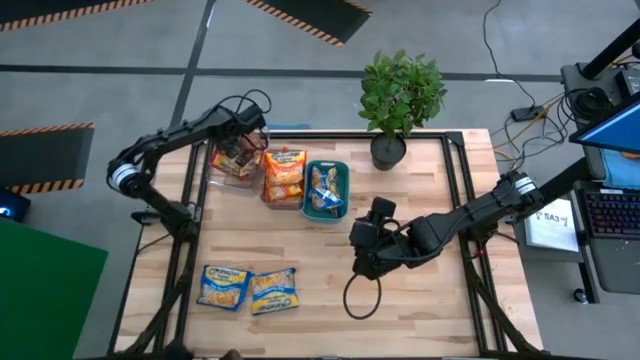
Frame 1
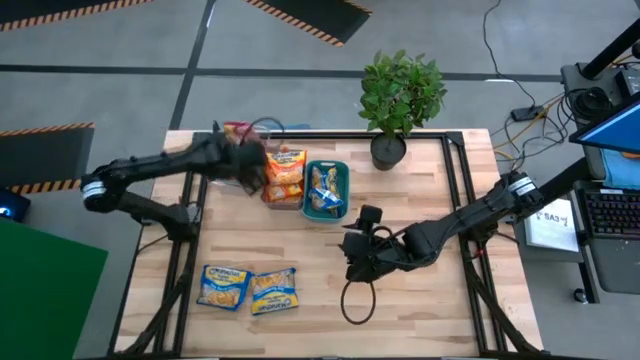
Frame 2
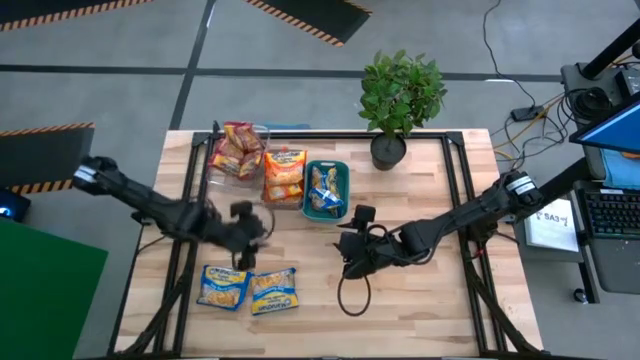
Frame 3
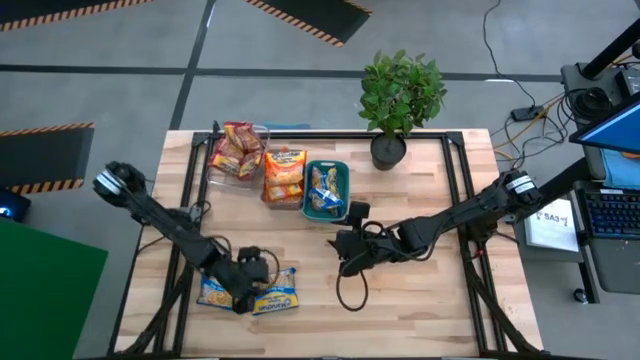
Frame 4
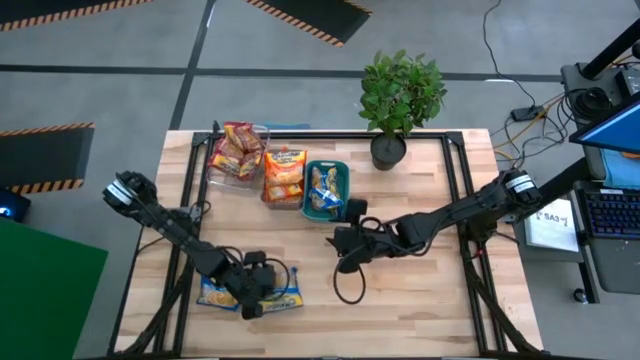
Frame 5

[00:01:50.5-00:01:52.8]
Task: Sort Maruchan noodles
Put the blue noodle pack into the green bin

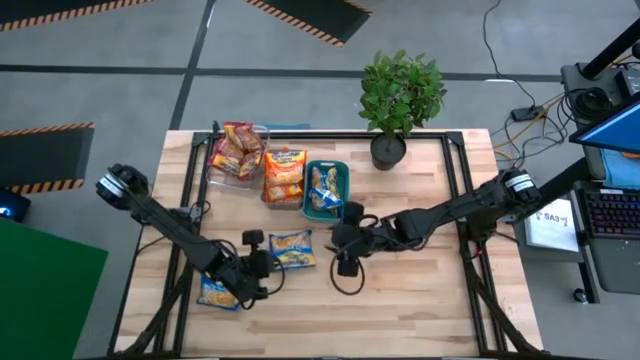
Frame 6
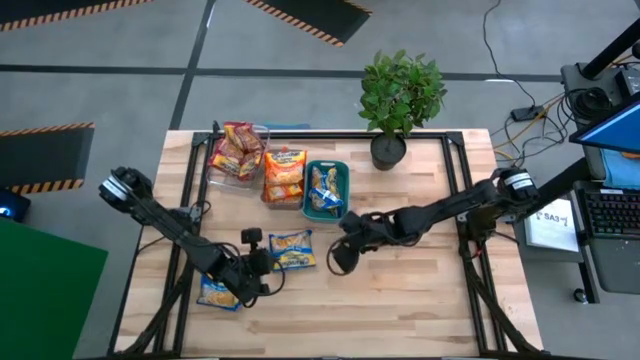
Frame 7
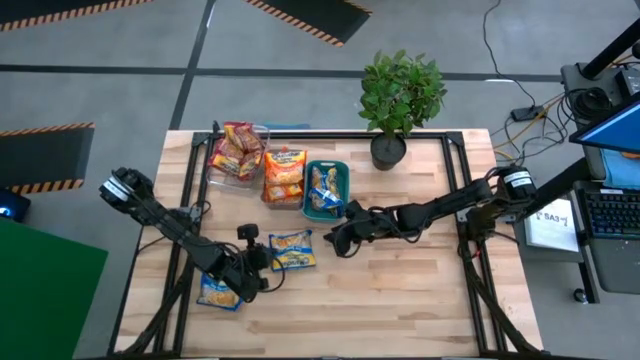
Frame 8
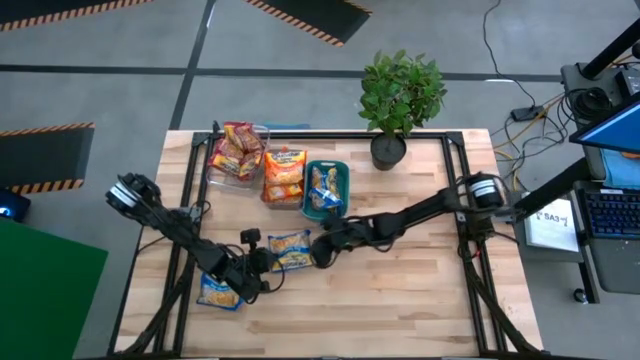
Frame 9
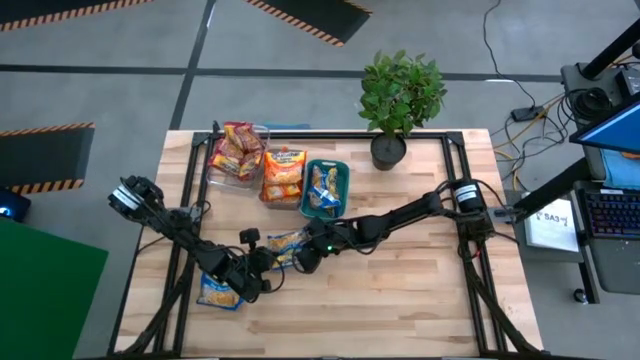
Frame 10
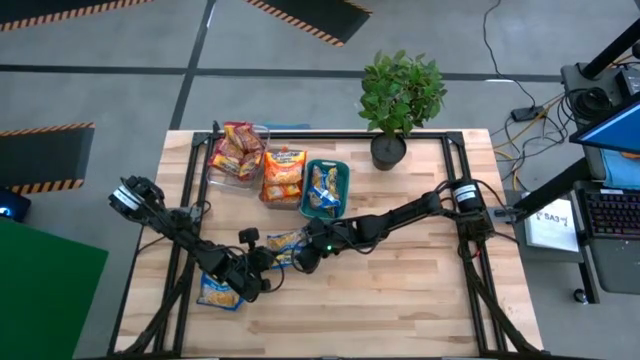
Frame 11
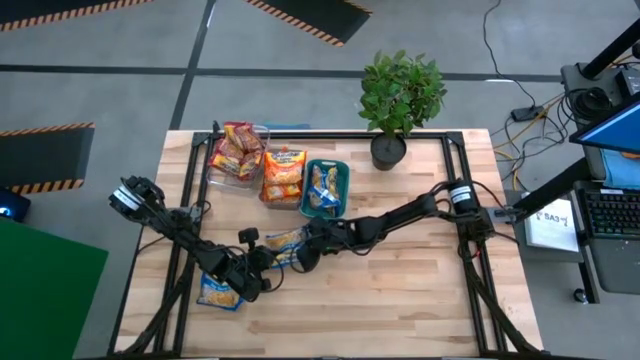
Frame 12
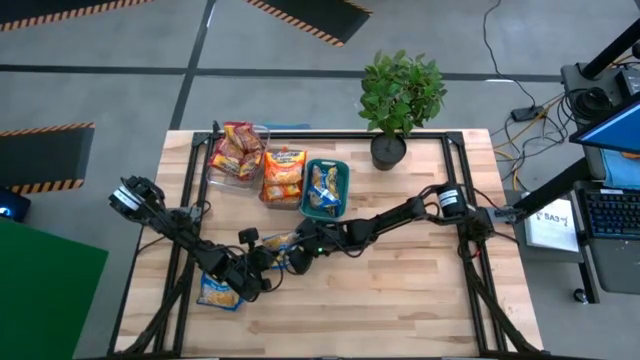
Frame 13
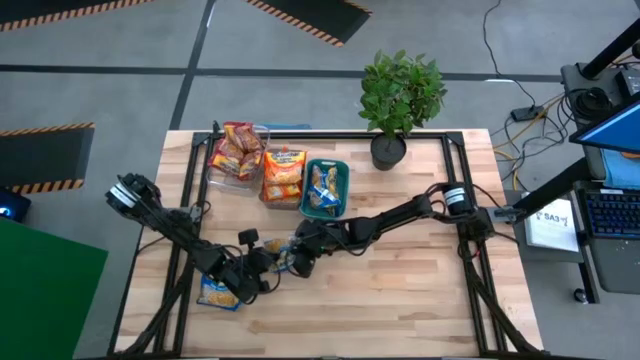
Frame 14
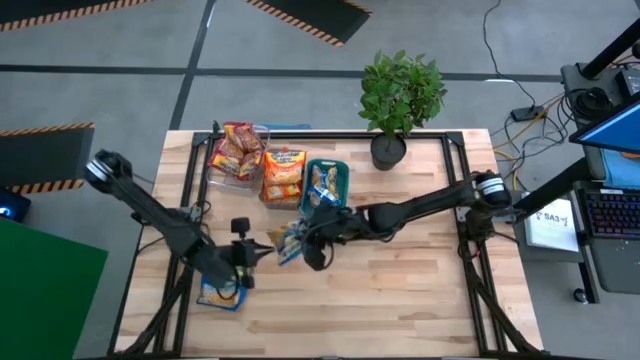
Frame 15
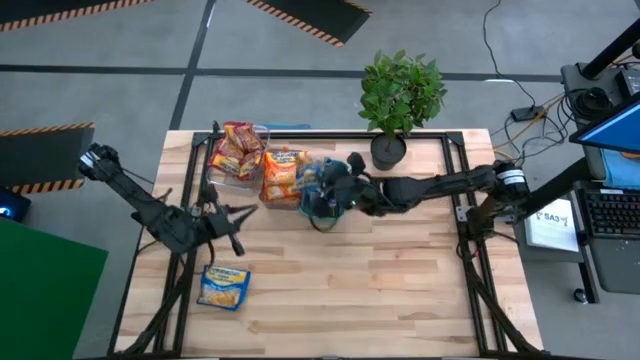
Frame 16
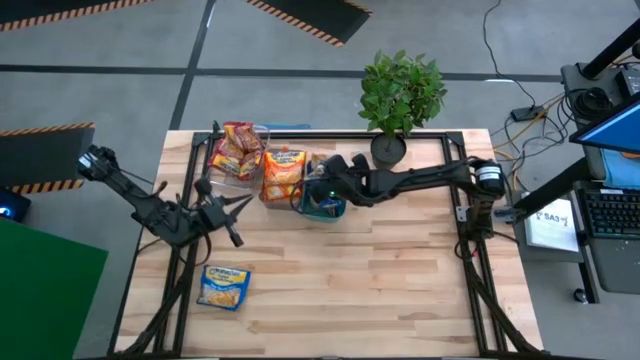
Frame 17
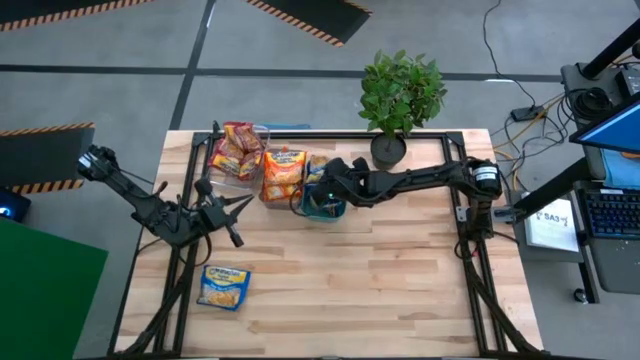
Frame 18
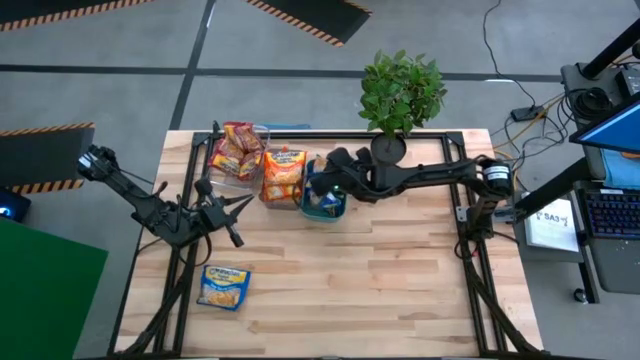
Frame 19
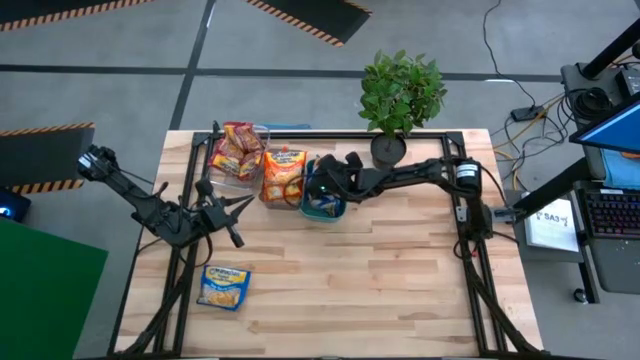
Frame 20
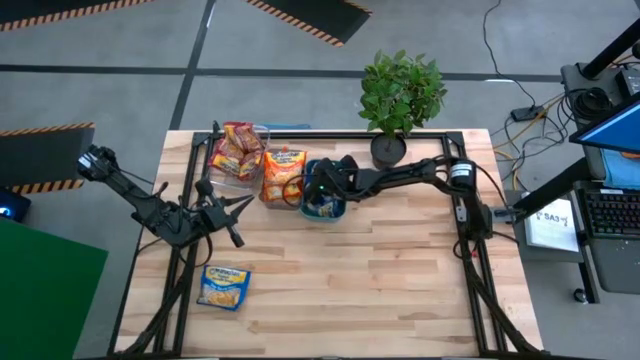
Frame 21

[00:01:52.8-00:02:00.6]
Put the blue noodle pack into the green bin

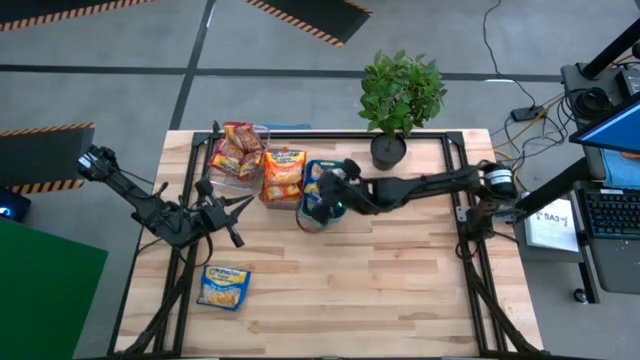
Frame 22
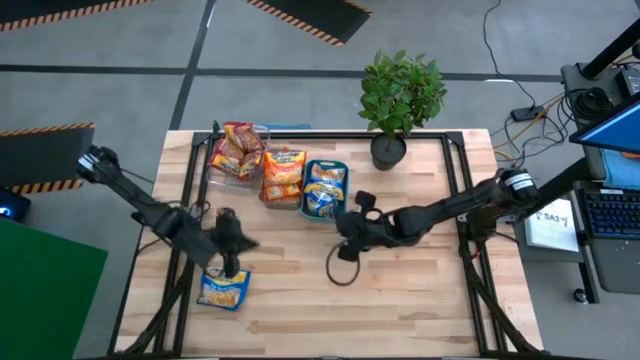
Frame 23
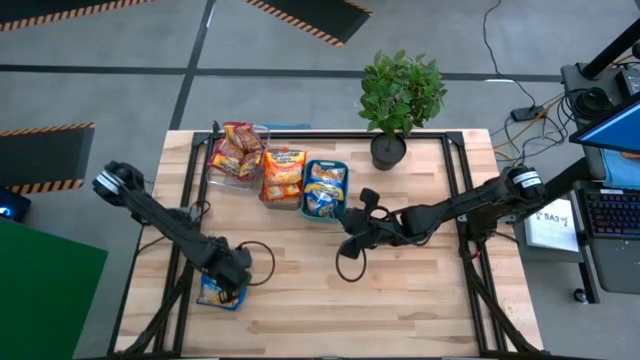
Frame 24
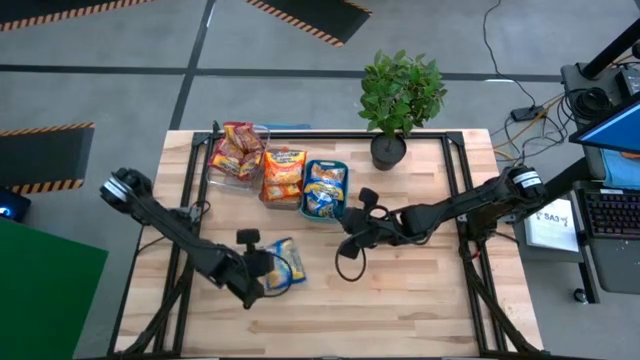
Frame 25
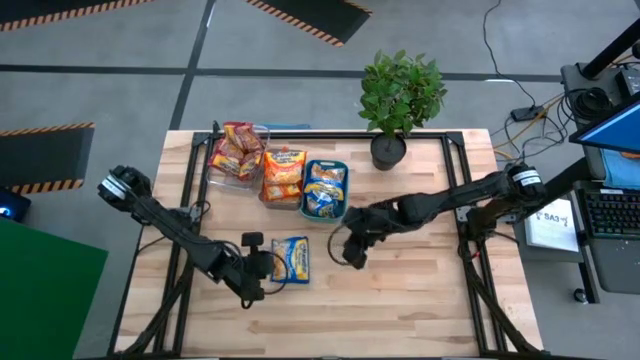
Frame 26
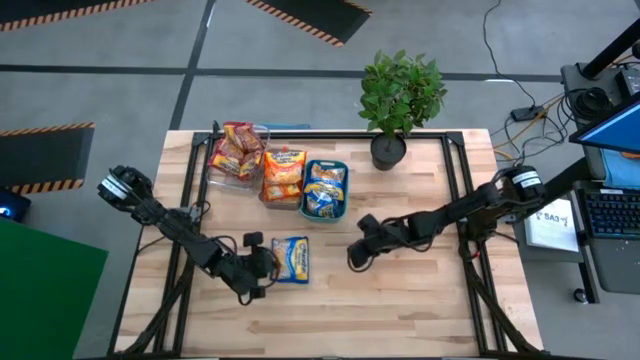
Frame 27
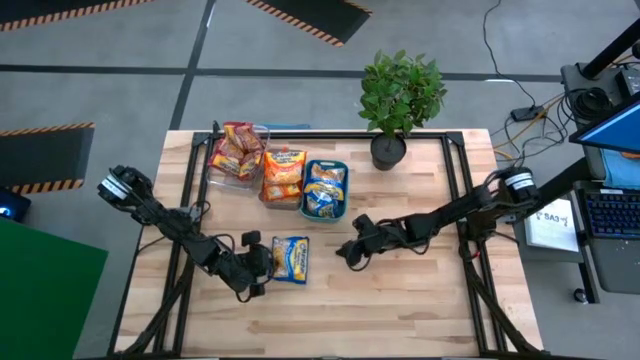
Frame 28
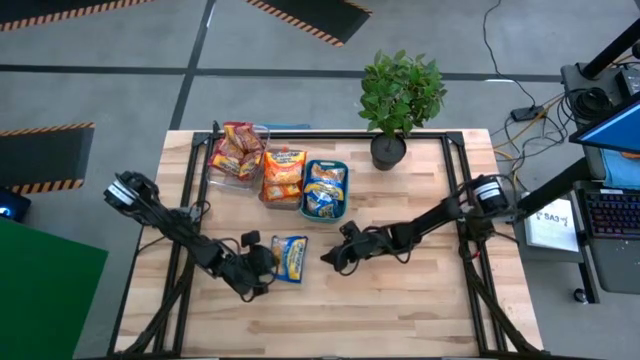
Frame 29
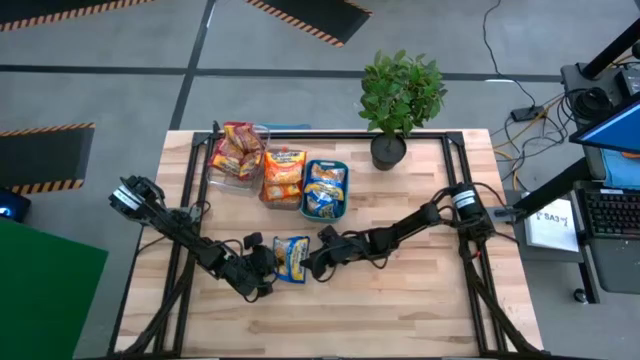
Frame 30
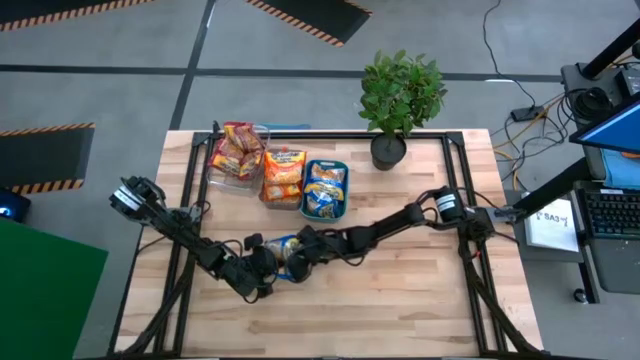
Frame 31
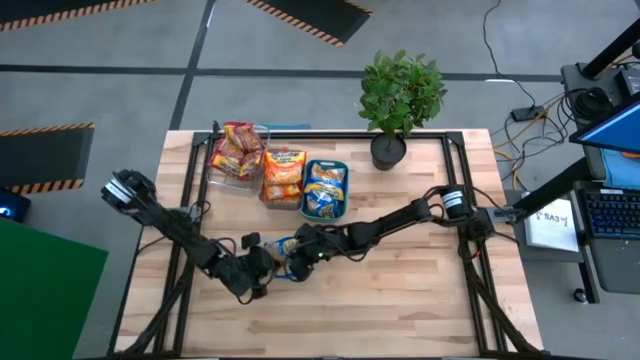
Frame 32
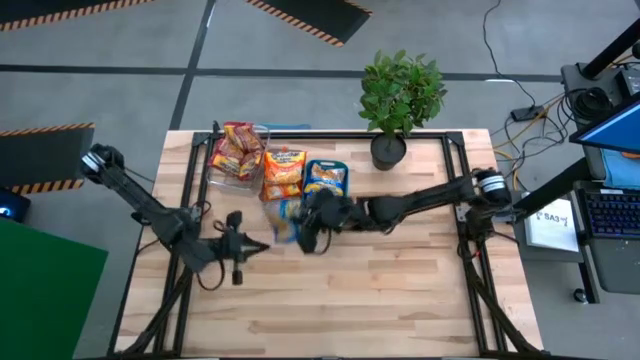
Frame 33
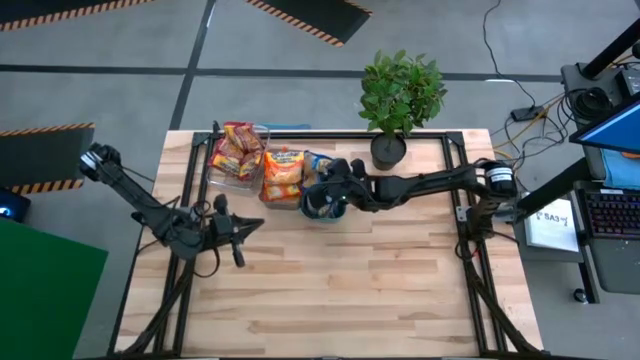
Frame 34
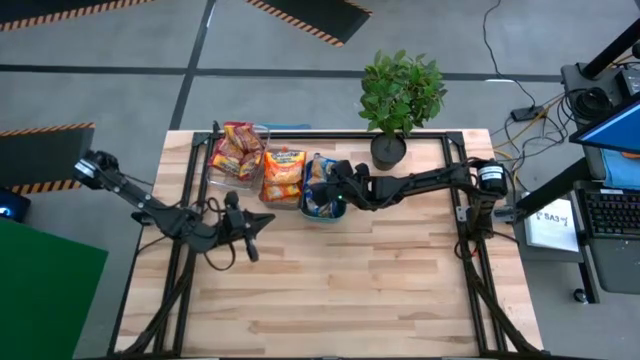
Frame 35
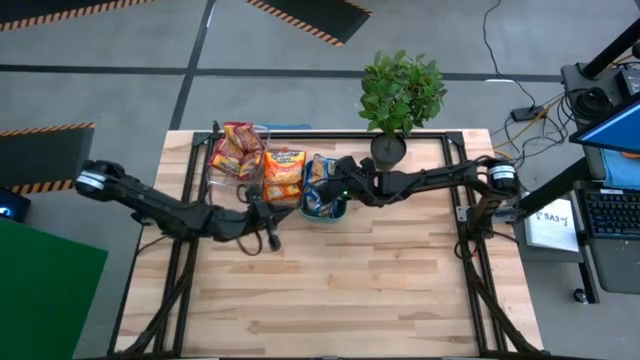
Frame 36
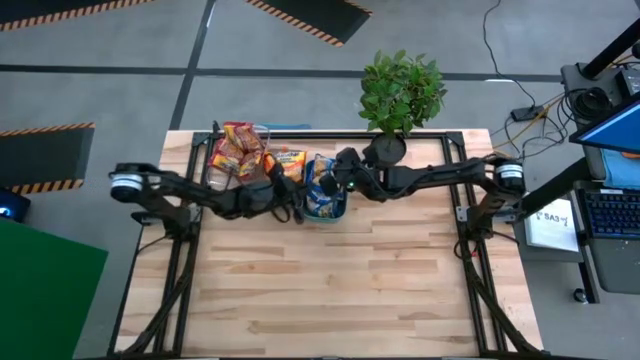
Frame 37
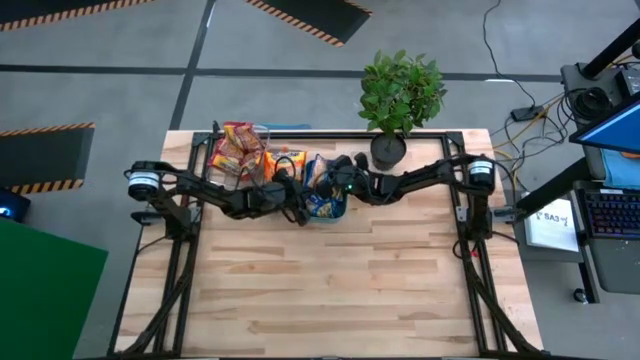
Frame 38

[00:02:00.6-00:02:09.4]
Put the blue noodle pack into the green bin

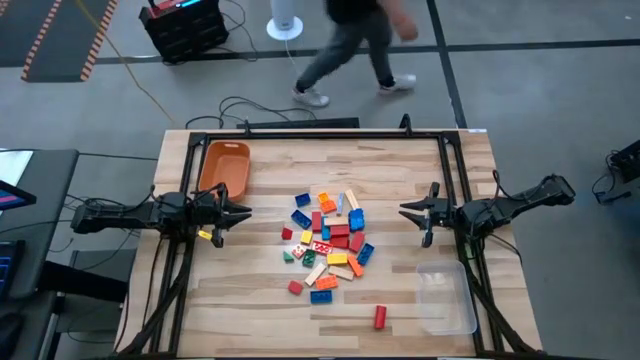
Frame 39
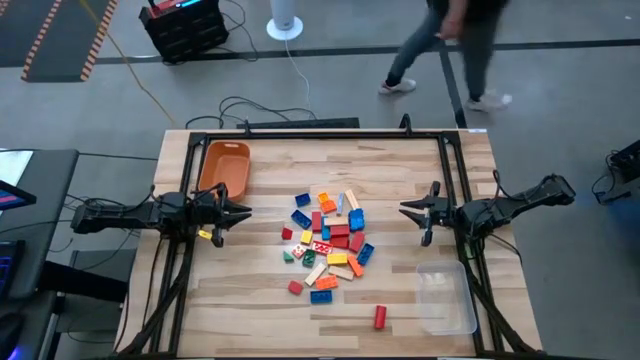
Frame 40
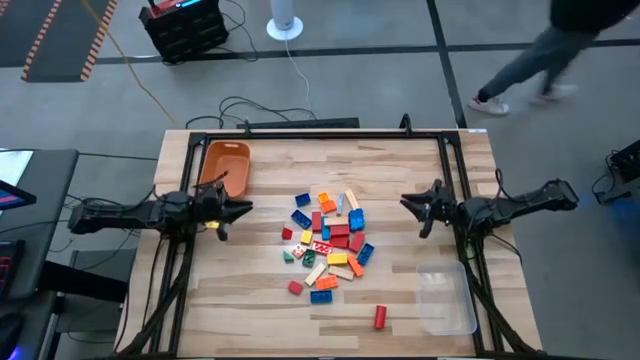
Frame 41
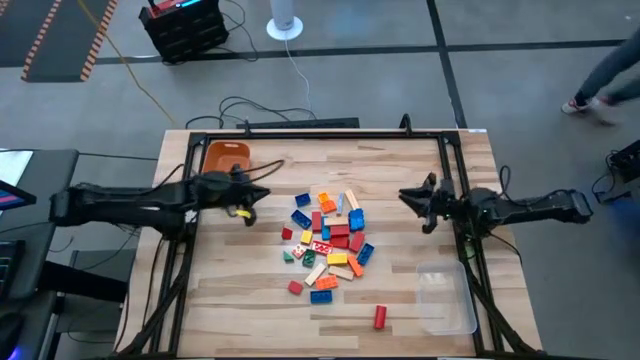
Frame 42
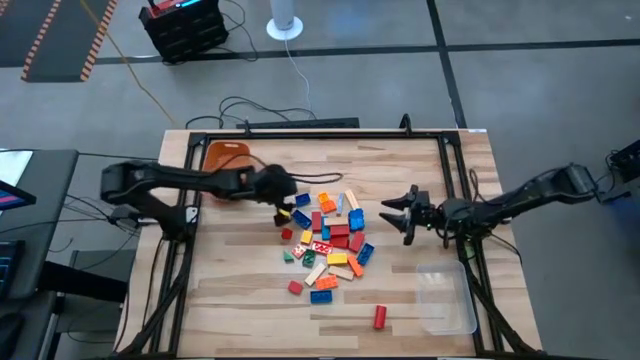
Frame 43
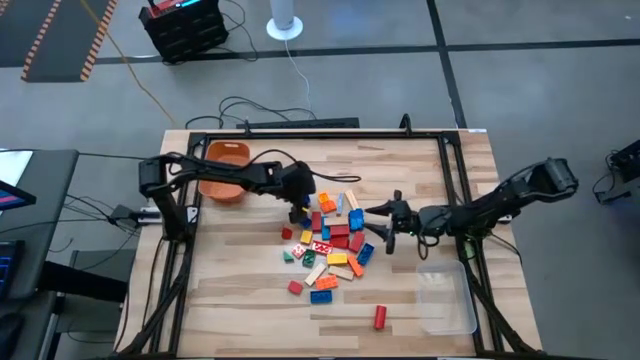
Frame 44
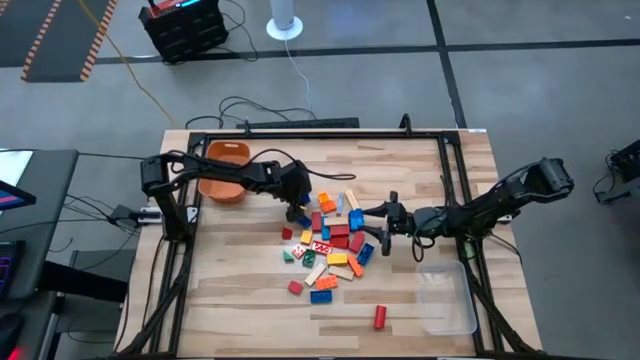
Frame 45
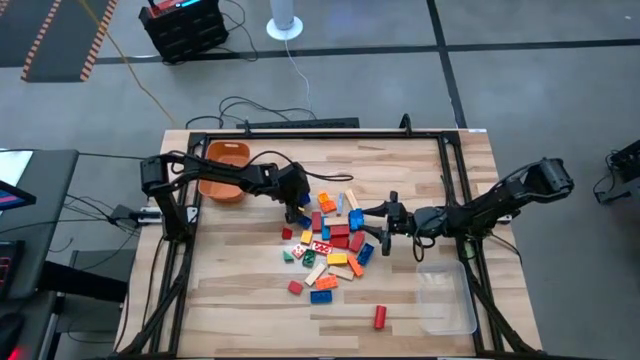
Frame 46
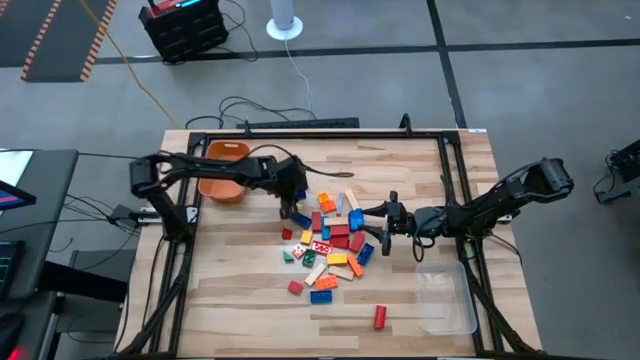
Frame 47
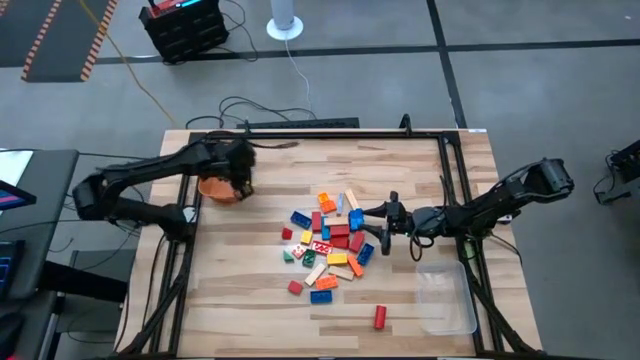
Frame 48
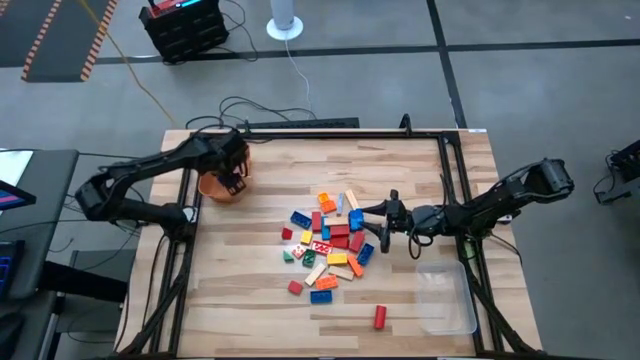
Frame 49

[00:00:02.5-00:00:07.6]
Task: Sort blocks by size
Put the small blue game piece into the orange bin
